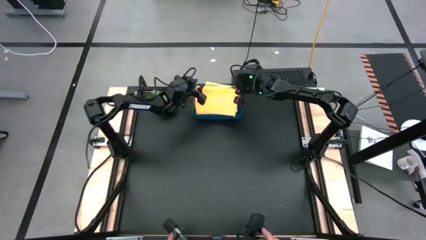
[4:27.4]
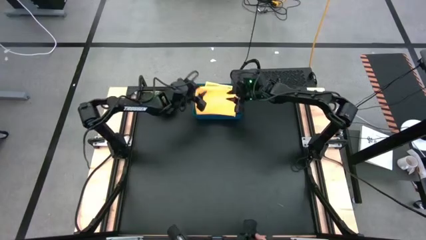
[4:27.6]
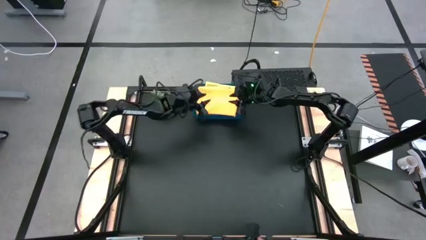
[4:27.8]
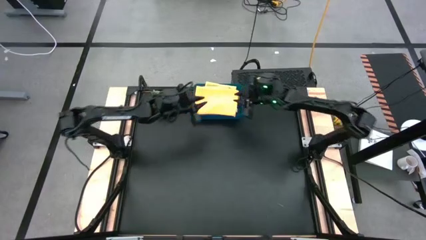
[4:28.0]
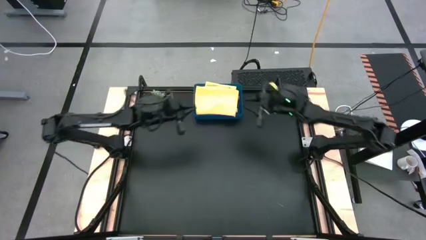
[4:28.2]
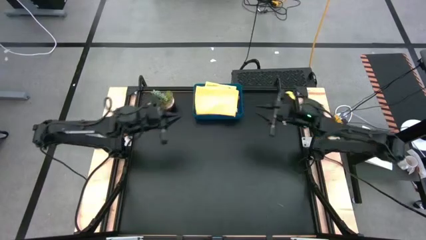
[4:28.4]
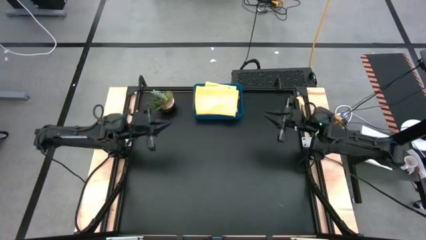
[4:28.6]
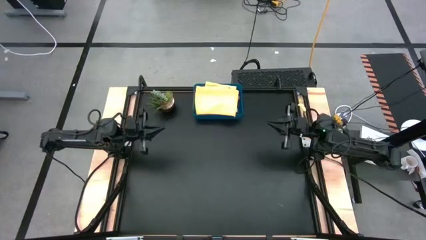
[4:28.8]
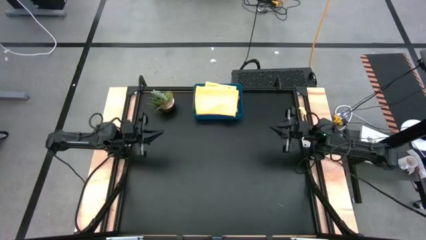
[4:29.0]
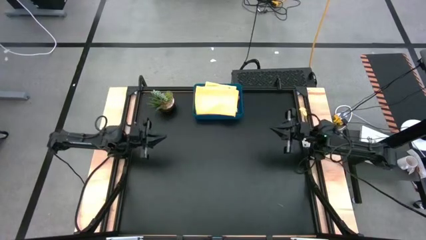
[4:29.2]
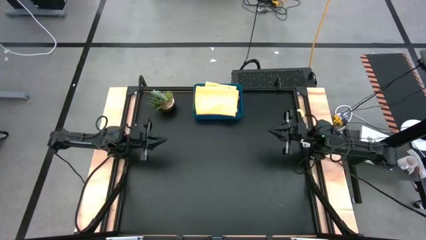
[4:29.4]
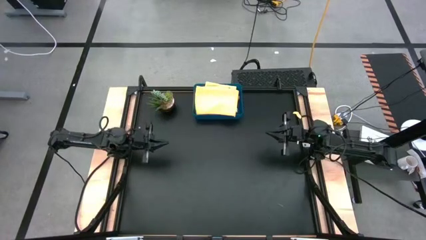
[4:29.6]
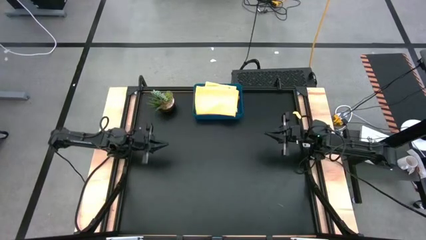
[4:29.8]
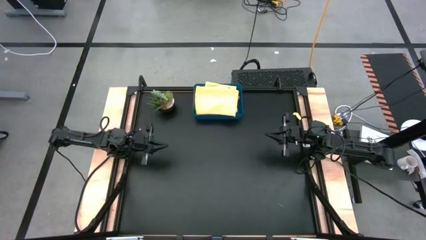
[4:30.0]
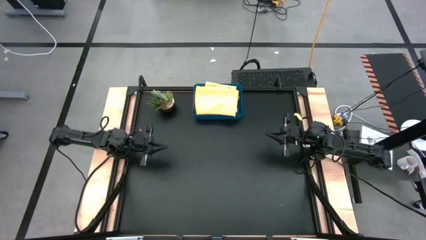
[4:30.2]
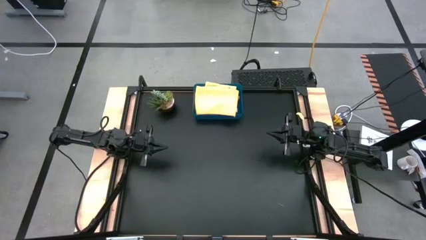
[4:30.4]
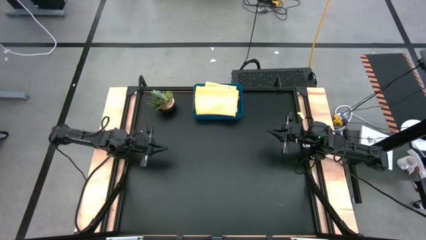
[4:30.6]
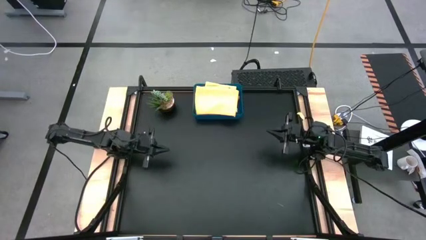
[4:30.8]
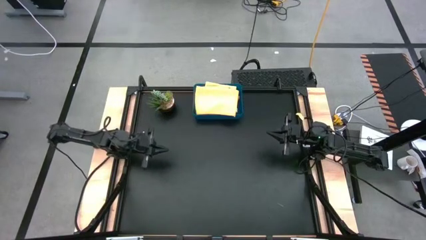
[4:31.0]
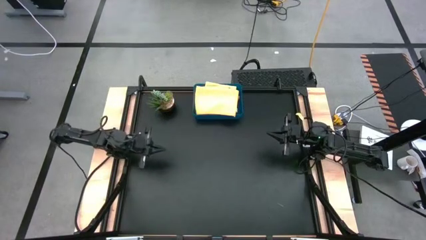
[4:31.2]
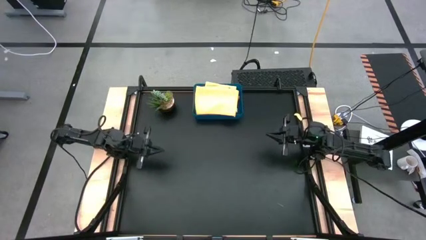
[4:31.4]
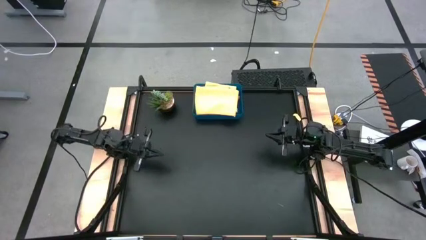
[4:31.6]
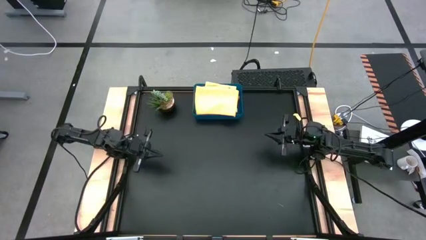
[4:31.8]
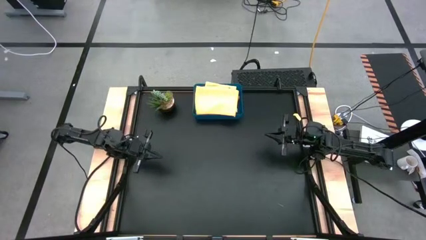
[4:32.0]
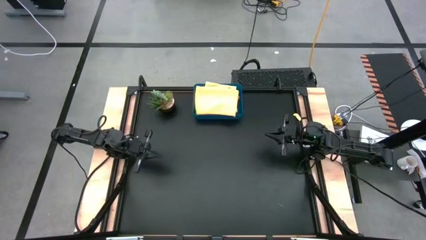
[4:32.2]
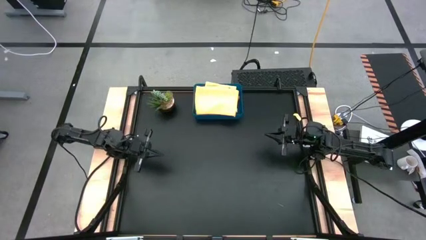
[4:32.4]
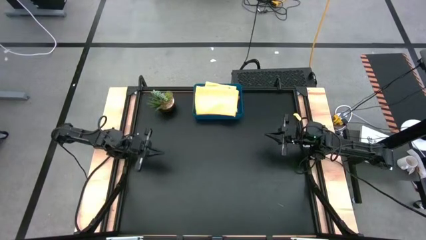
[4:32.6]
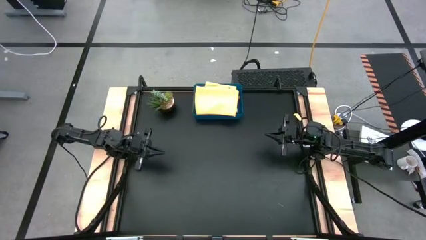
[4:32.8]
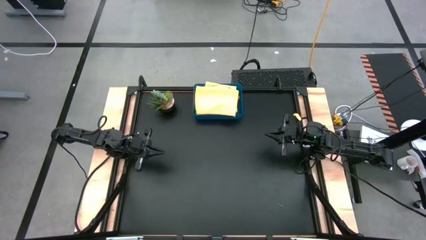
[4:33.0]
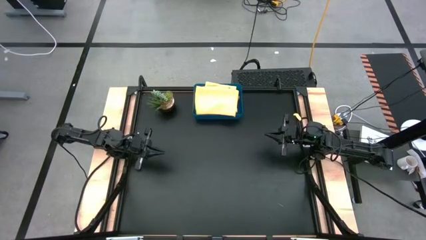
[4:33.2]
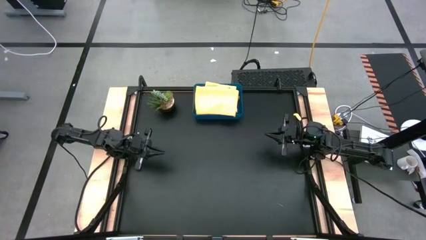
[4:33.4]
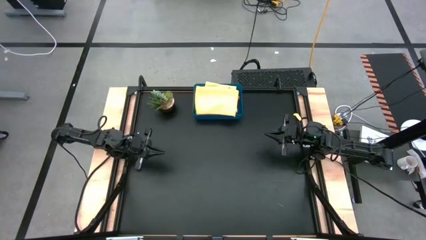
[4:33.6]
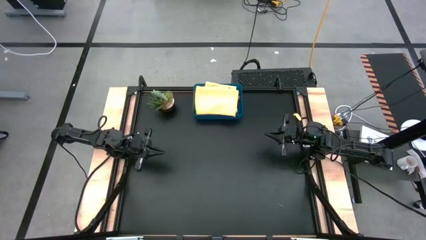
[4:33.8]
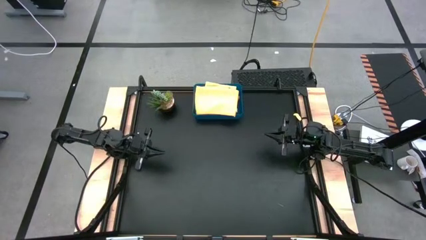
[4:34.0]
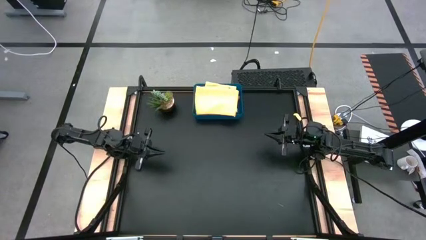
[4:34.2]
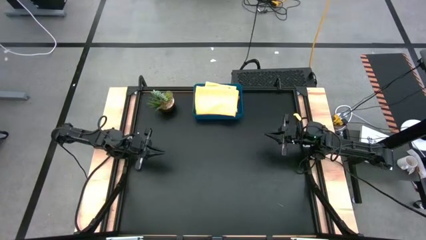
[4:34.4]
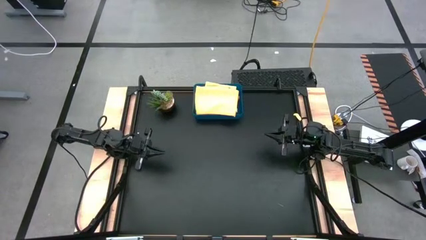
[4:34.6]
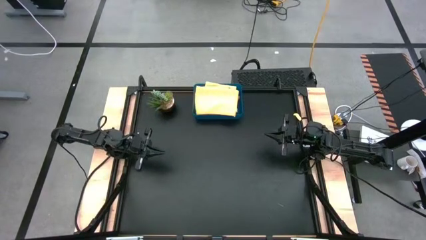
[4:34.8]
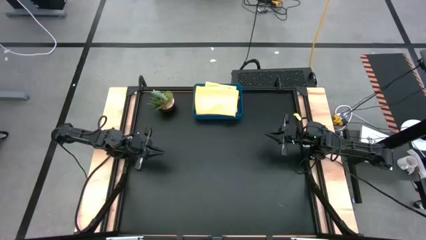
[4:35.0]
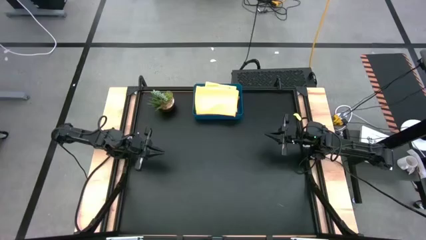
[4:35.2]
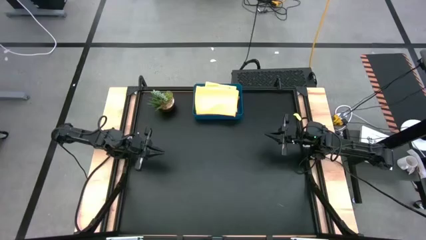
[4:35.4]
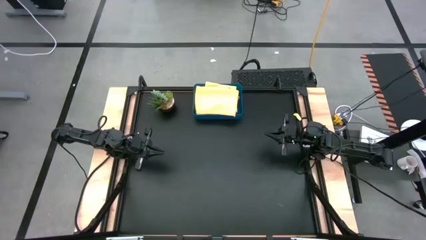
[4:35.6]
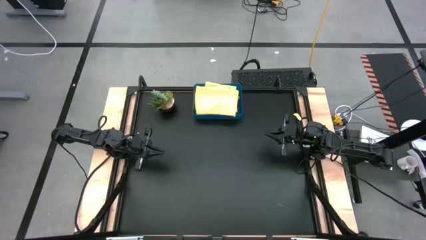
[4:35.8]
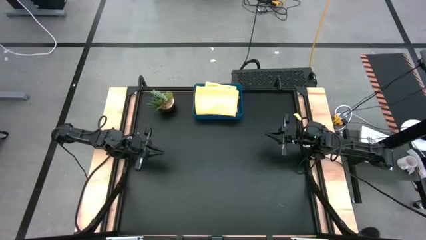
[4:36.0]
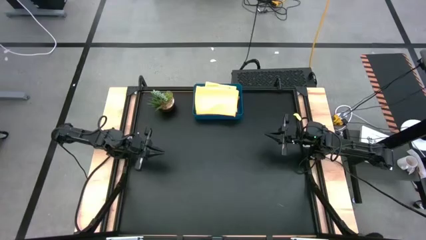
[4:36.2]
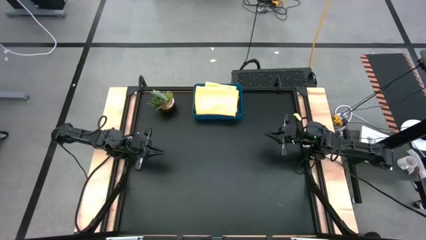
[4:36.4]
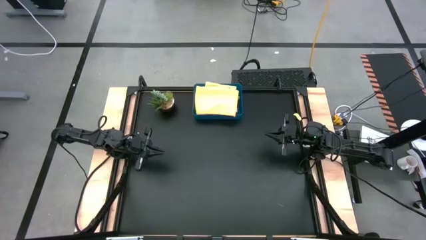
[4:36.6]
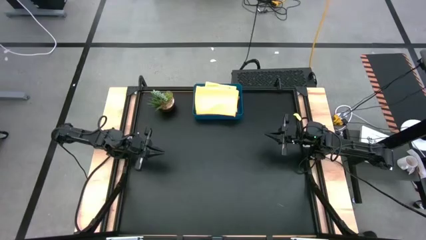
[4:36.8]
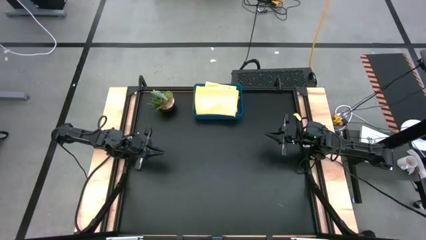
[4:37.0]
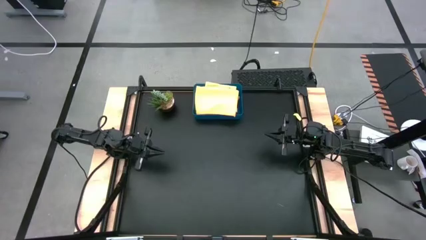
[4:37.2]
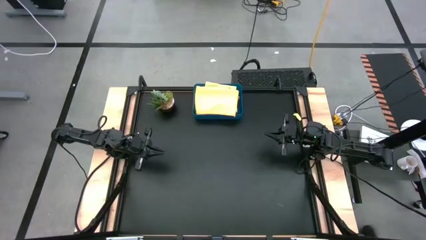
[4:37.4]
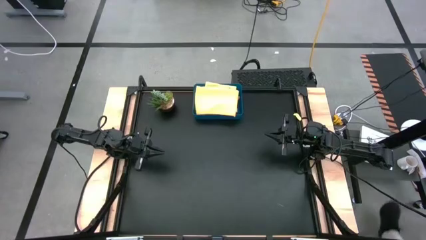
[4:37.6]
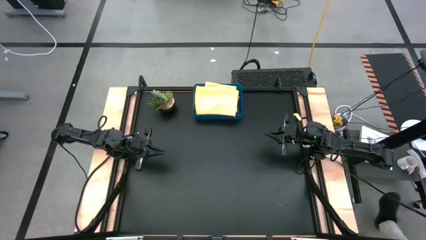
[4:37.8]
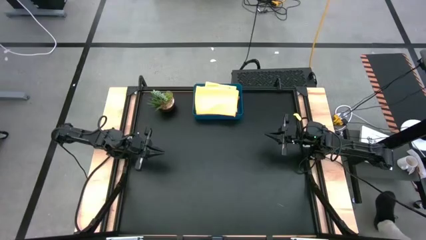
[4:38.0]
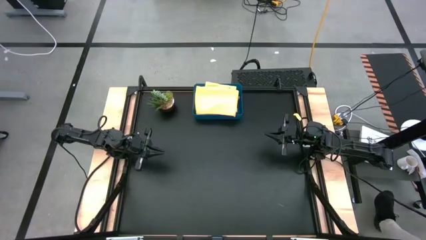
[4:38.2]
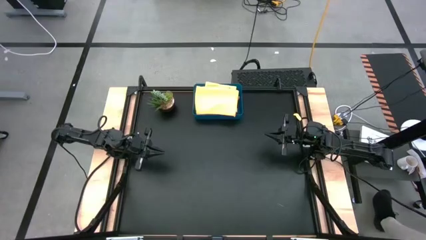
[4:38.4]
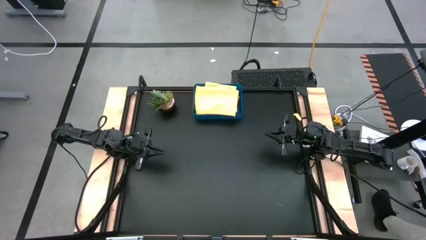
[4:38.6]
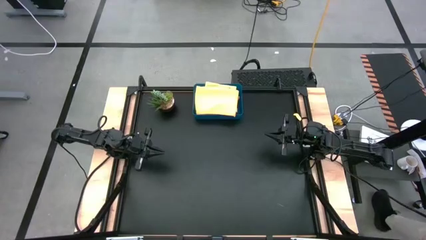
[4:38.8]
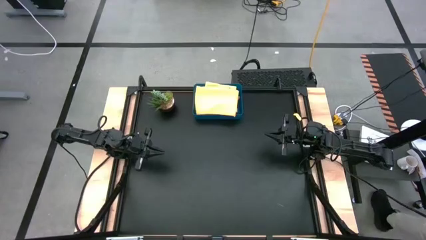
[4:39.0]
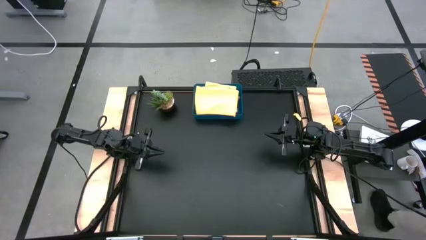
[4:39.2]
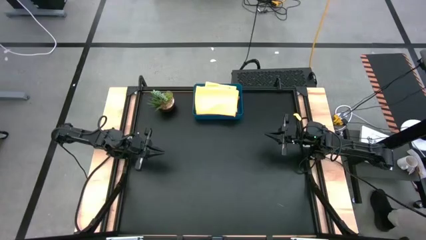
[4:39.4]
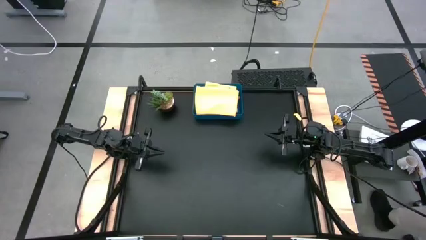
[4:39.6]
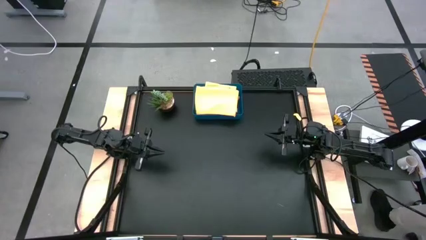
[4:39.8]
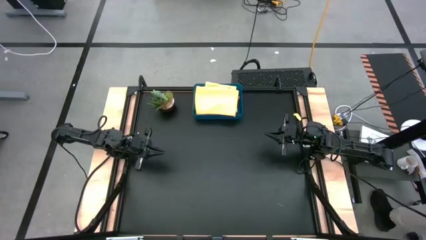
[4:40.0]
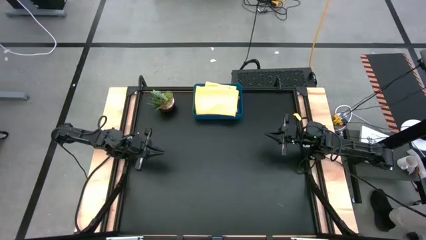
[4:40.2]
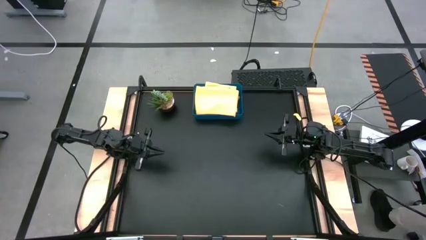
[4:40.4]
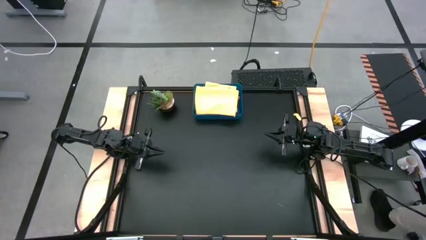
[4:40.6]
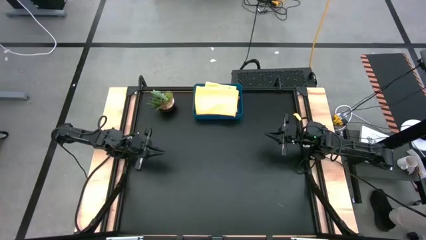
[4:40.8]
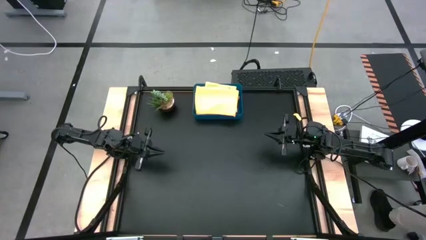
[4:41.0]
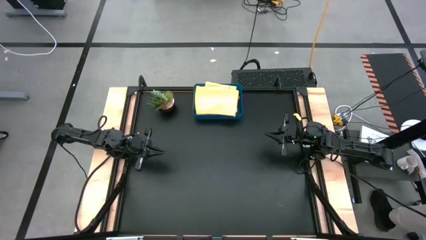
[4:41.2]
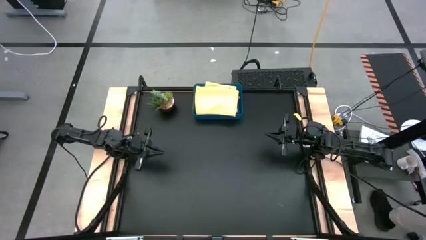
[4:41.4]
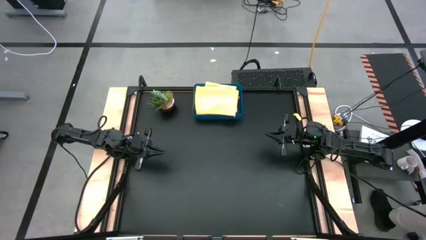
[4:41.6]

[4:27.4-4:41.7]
Task: Fold microfiber towels
Return to Home Position

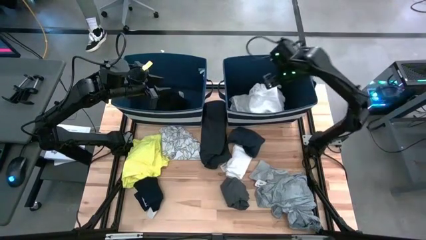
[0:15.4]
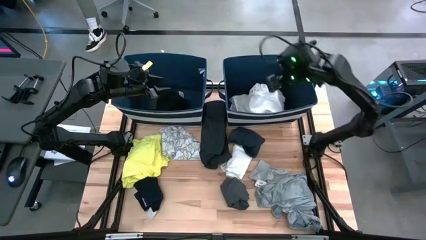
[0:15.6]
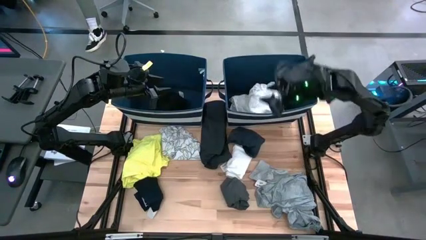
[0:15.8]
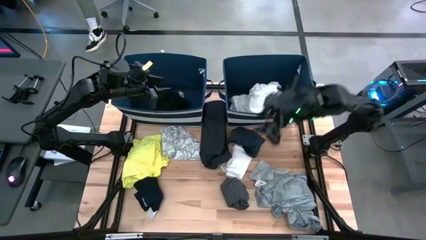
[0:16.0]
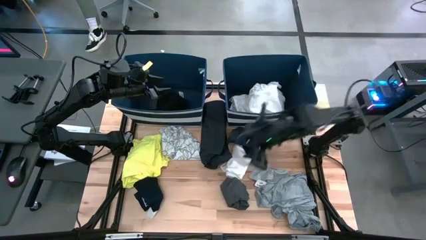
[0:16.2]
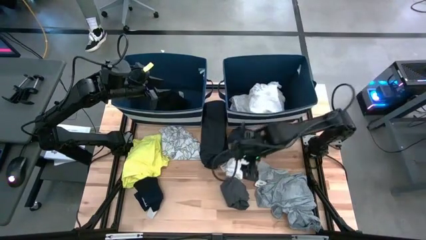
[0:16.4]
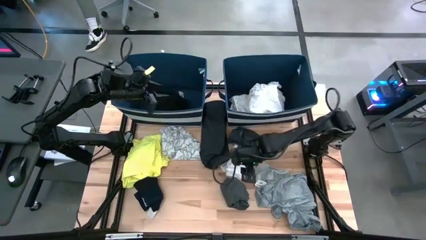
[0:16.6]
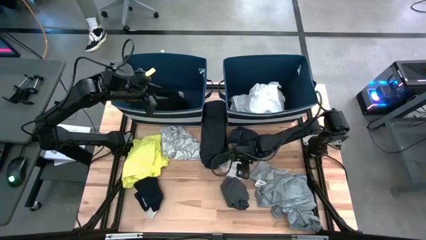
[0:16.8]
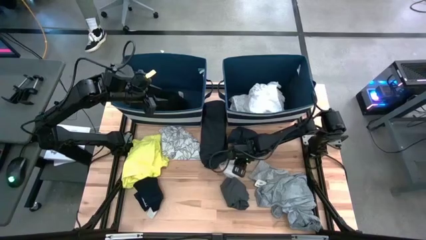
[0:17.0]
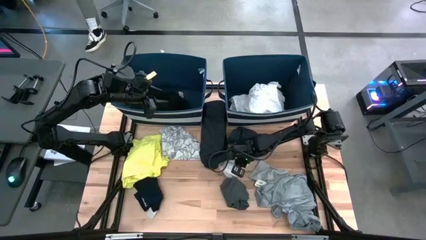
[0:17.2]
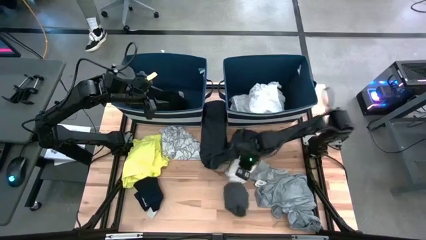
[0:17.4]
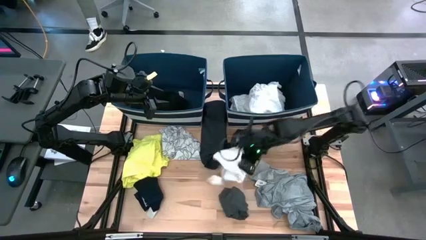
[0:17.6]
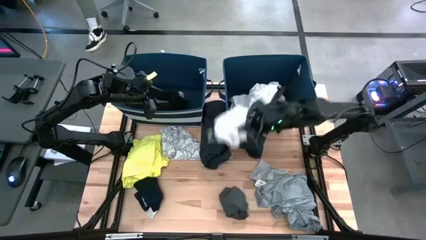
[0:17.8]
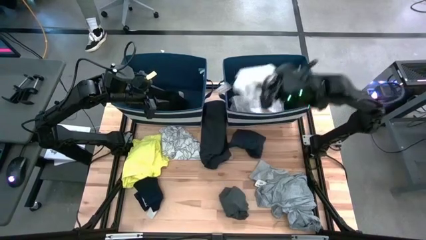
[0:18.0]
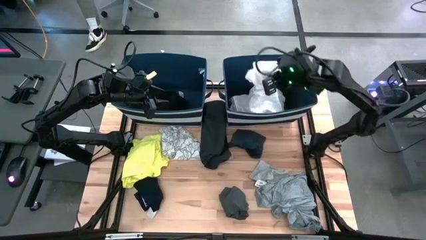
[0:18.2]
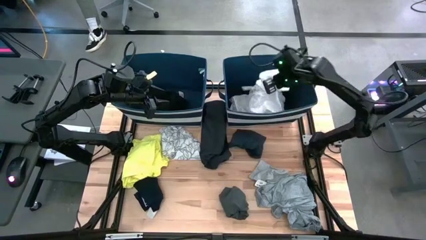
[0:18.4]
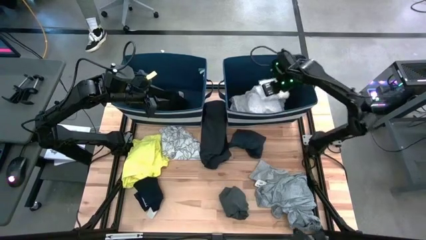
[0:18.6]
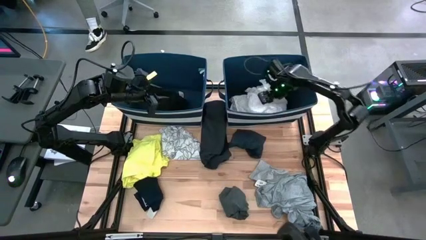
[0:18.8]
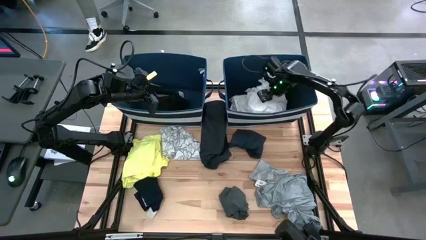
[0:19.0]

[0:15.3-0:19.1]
Task: Sort clothes
Put the white shirt into the right blue laundry bin
